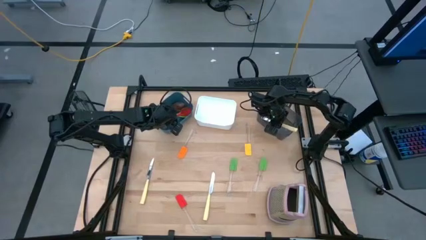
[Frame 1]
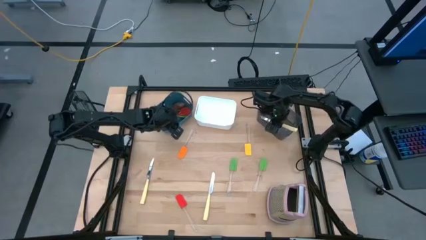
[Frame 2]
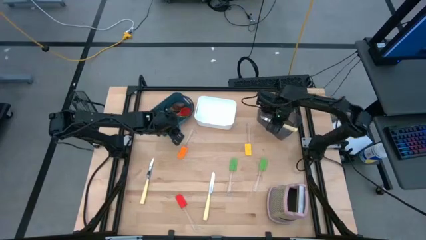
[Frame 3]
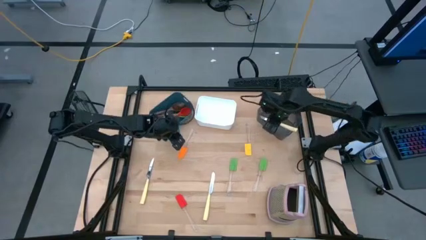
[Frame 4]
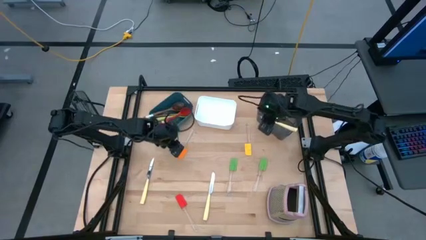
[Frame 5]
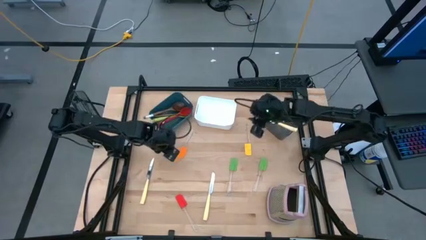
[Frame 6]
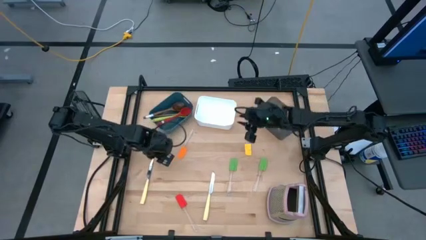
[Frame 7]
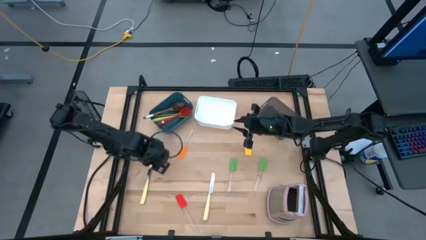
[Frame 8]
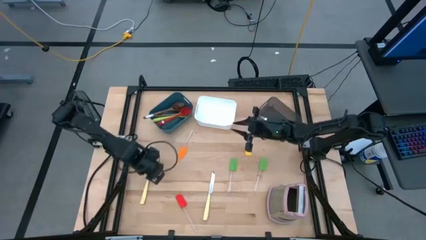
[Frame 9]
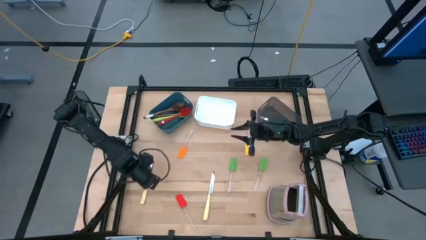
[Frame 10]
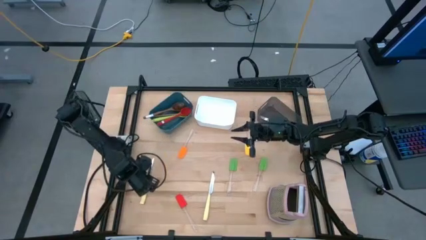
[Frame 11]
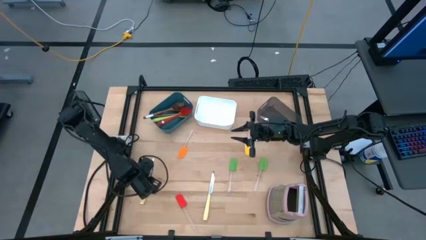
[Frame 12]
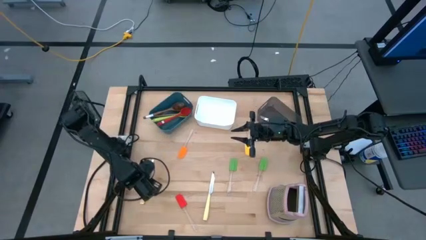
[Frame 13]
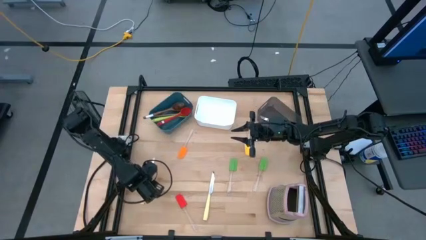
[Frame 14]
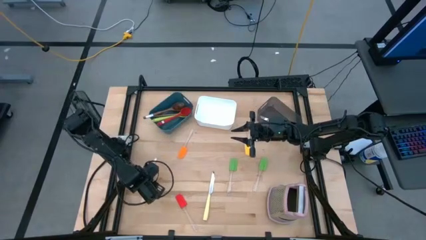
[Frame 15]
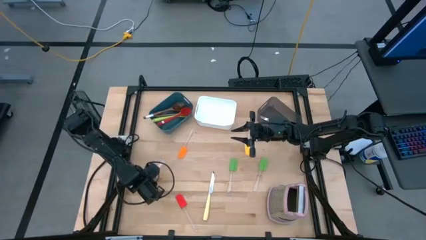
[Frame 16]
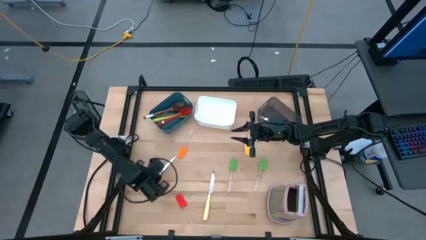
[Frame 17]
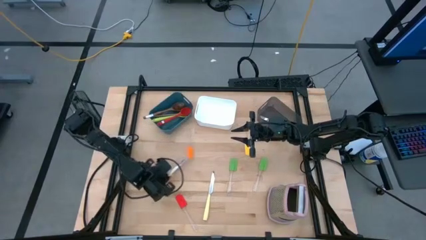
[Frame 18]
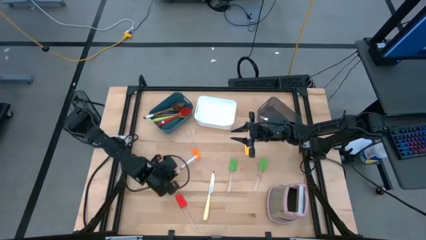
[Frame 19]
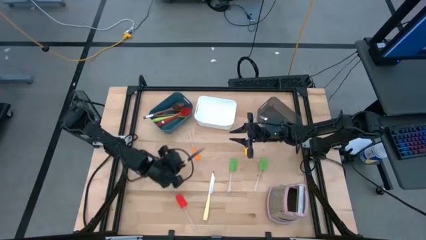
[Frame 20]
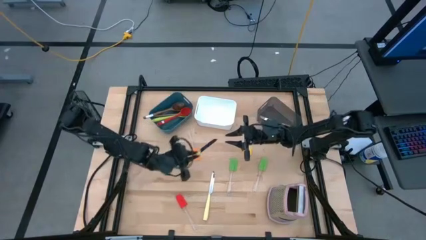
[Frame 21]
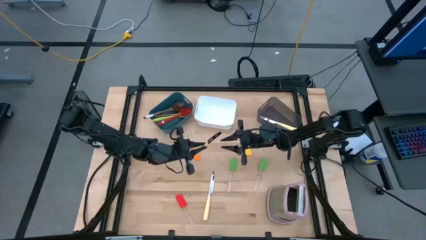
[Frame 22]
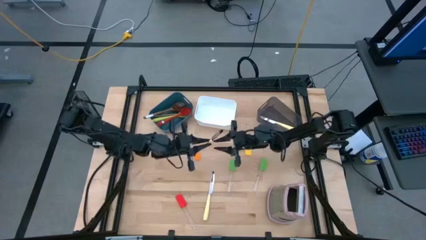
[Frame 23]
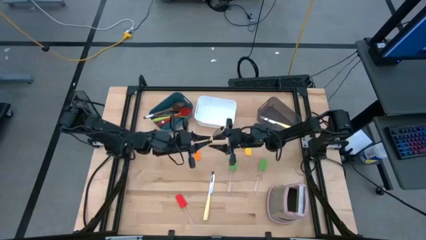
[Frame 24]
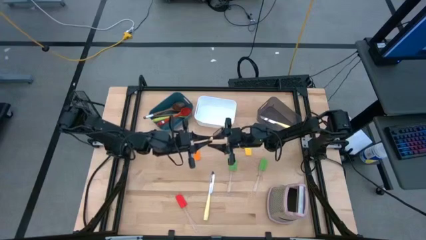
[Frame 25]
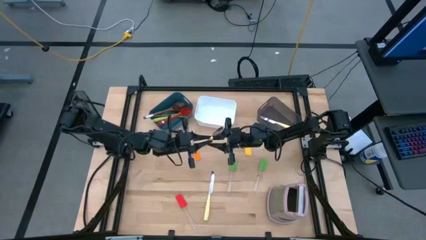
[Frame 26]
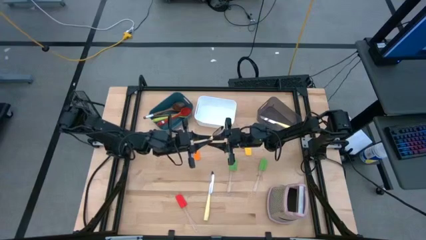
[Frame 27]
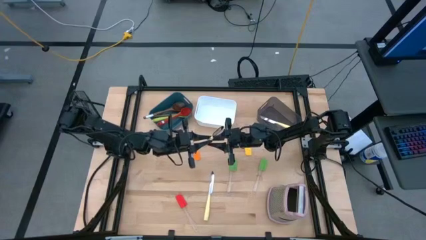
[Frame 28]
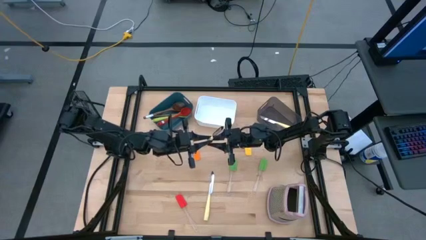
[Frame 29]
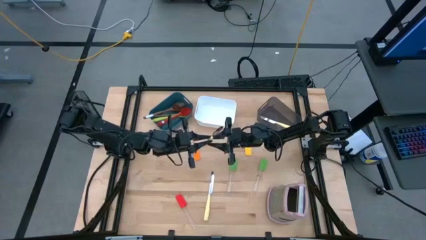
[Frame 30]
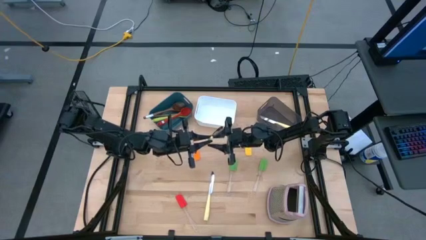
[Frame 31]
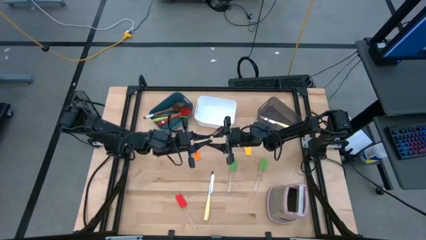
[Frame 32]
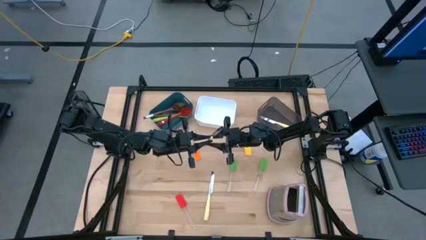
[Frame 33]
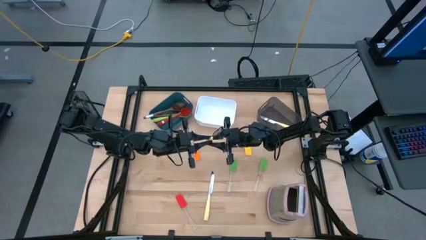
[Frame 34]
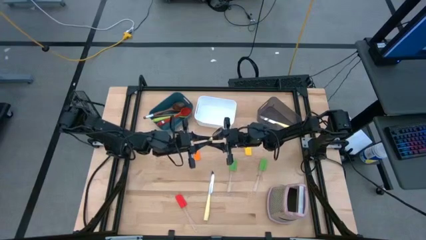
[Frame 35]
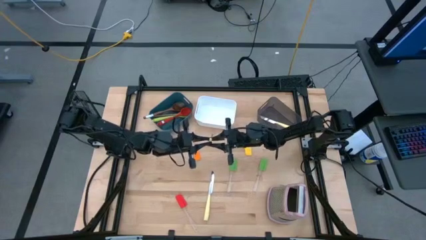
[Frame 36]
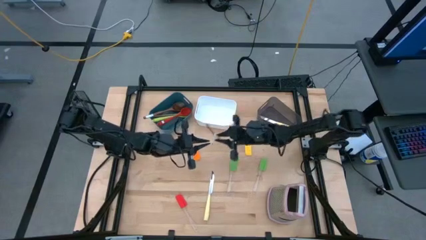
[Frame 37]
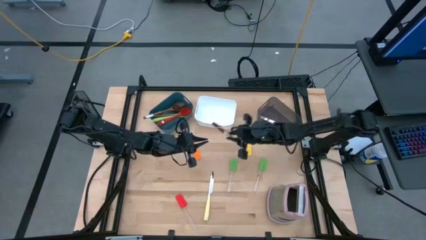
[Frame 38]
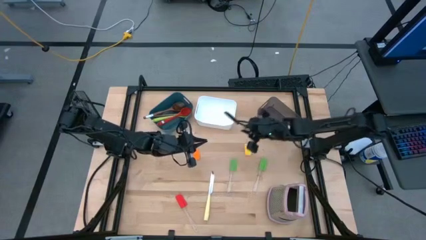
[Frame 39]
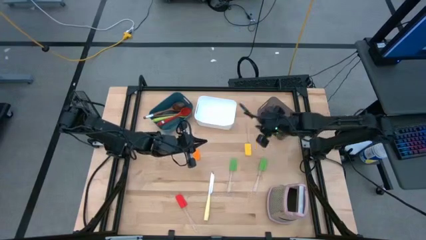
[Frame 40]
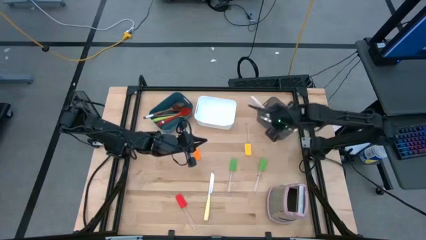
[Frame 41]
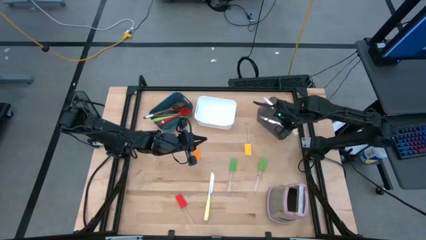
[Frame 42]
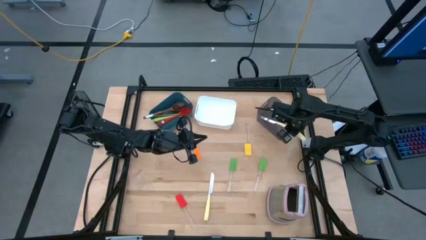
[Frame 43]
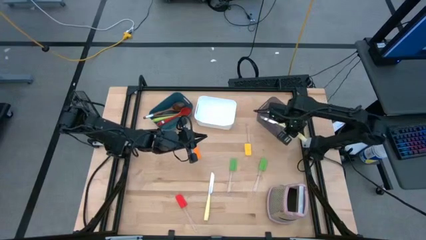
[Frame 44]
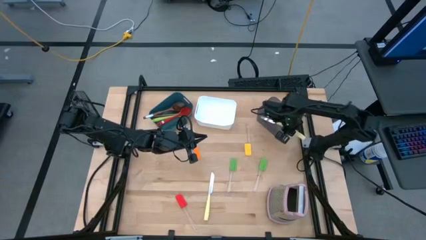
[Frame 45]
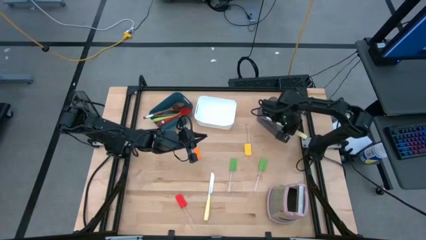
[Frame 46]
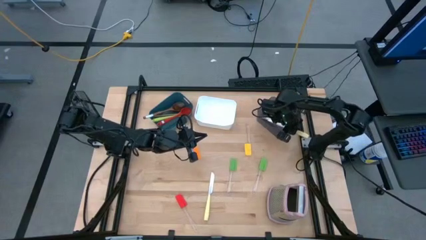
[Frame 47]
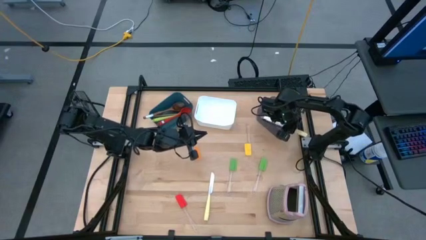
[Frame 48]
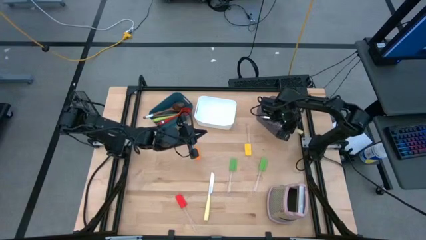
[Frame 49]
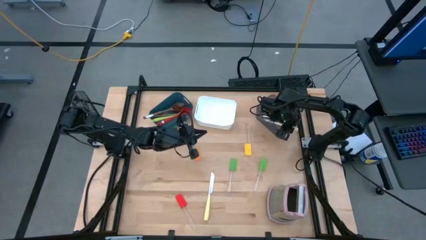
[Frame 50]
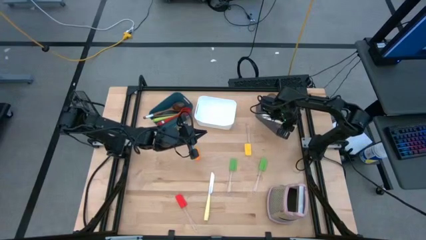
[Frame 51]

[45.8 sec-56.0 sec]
Task: Pick & Place Kitchen Items
Put the left yellow knife into the black bin

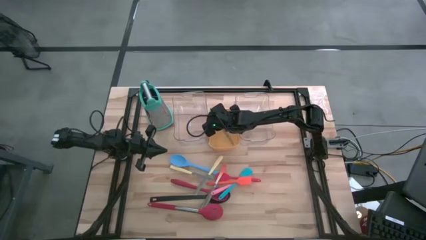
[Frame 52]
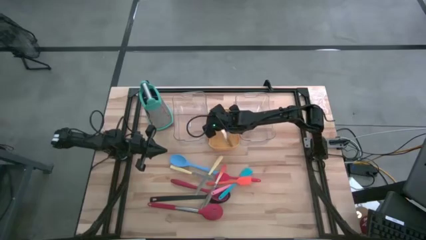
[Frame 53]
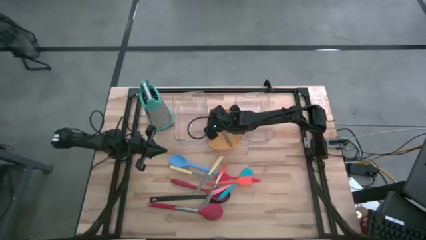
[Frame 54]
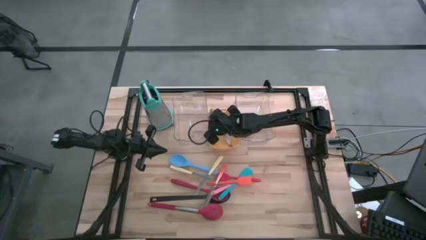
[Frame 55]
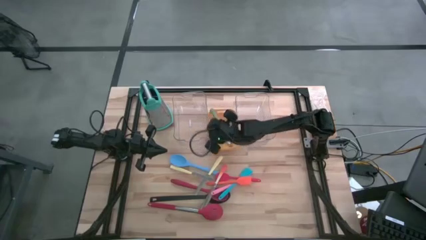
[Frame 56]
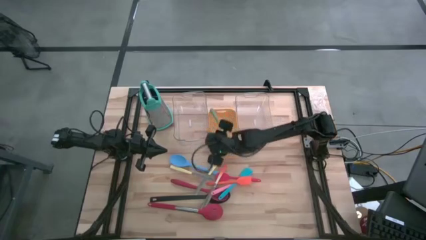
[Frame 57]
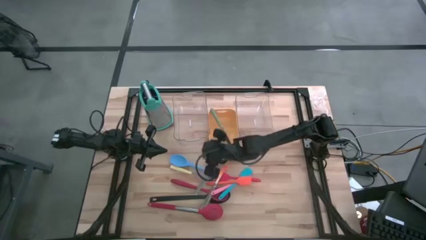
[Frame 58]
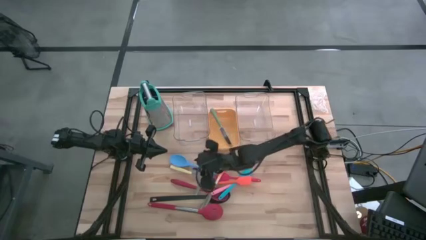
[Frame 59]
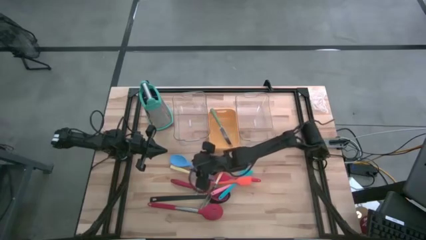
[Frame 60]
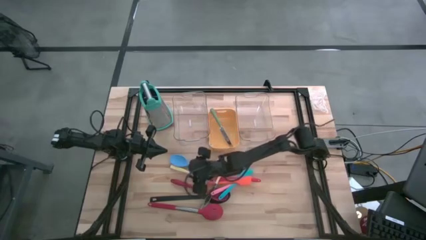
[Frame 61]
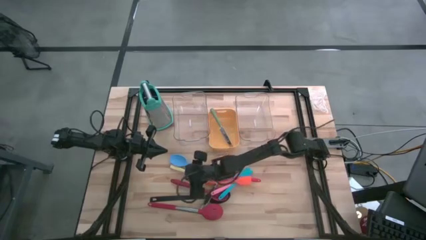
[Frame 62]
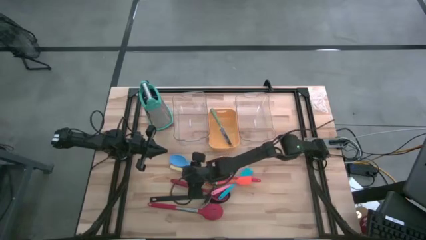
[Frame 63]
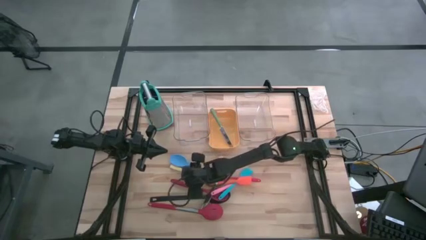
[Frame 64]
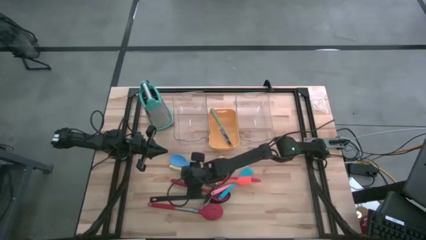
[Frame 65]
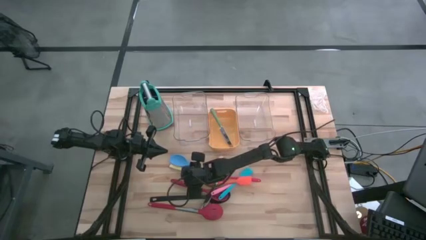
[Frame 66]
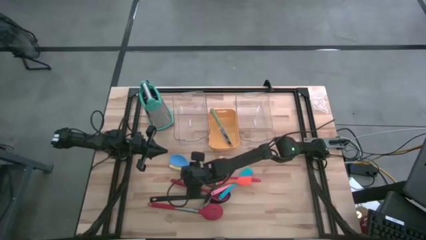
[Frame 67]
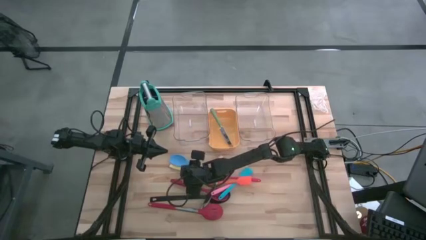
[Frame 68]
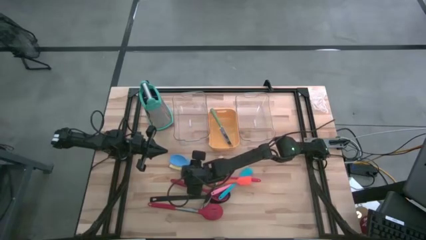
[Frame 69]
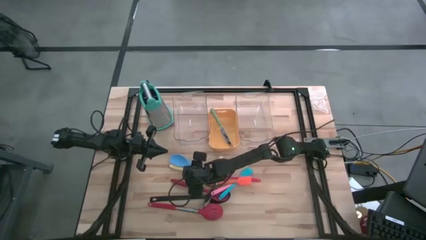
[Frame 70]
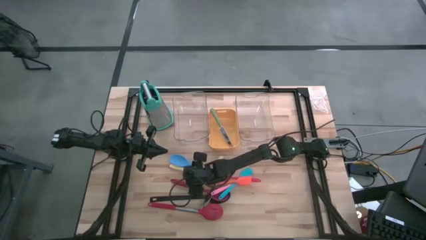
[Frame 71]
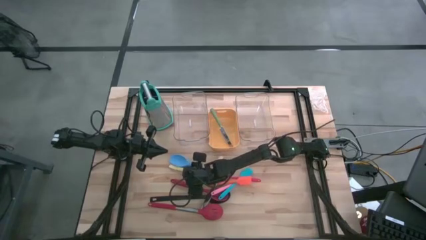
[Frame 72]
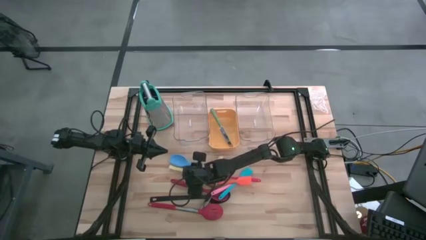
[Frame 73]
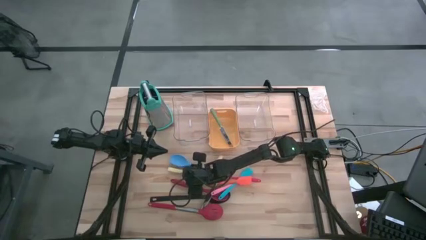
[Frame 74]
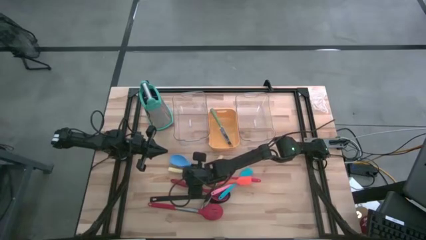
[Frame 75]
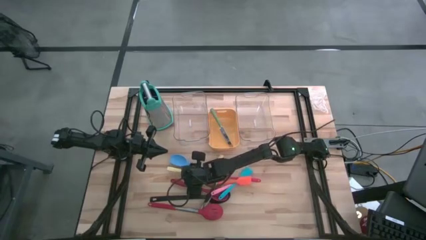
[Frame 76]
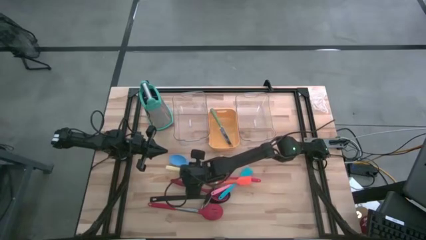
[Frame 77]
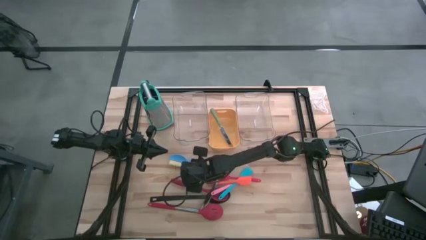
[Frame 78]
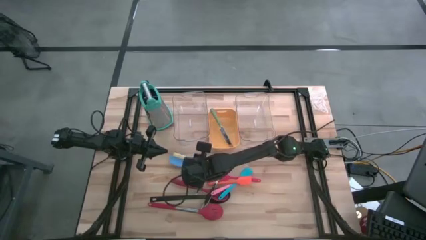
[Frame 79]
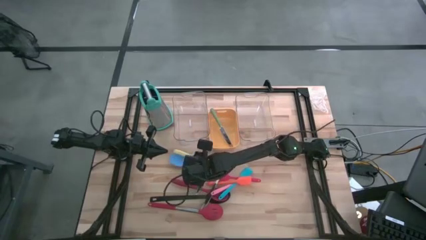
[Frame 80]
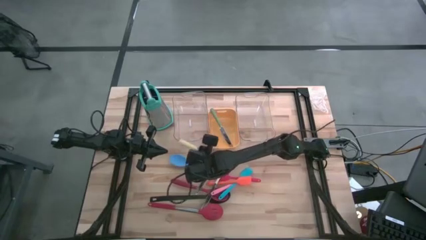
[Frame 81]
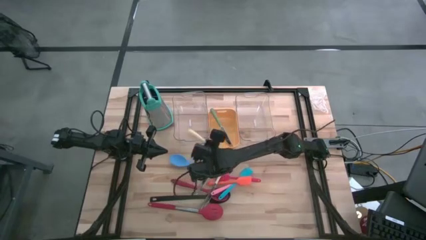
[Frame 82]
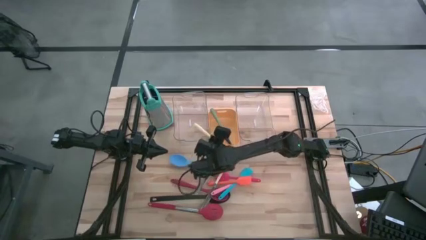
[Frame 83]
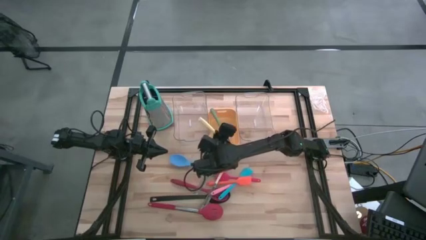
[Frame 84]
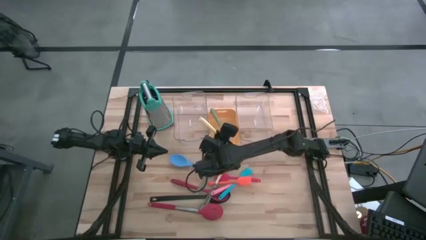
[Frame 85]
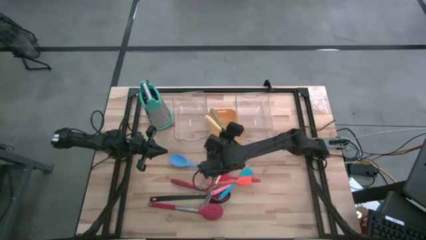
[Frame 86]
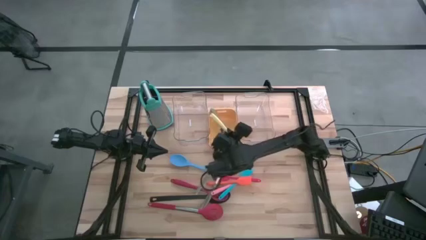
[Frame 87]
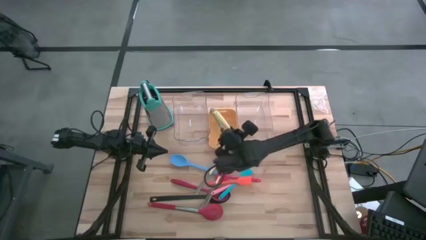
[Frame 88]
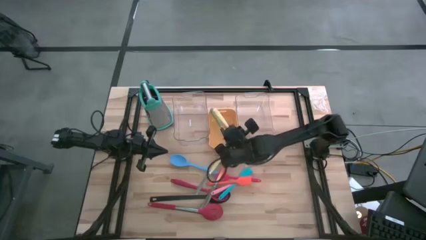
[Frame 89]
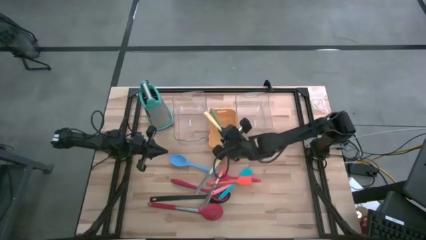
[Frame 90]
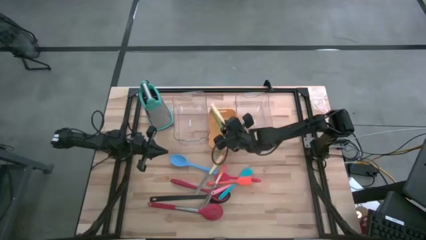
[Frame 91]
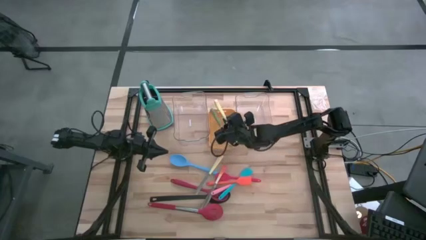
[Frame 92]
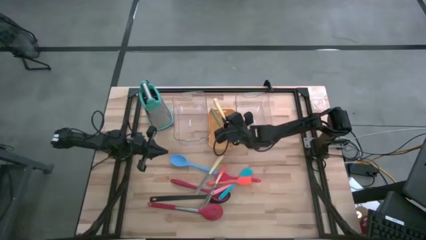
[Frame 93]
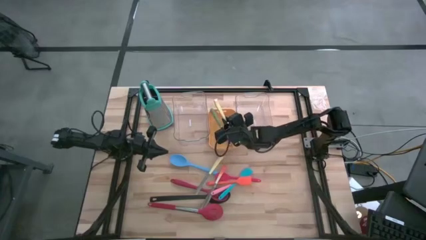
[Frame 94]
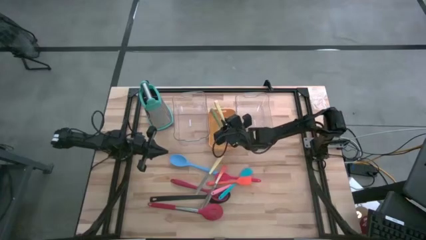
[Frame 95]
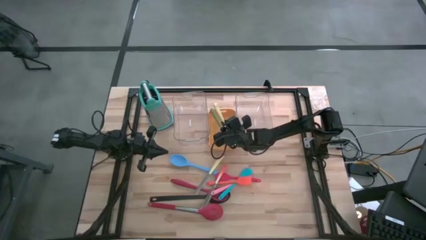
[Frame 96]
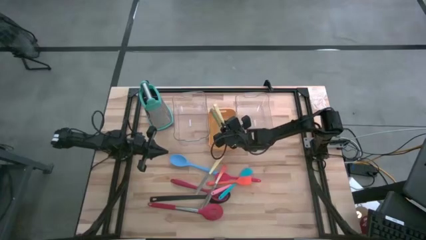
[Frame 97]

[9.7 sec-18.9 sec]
Task: Pick & Place Kitchen Items
Put the left yellow table knife into the orange bin
